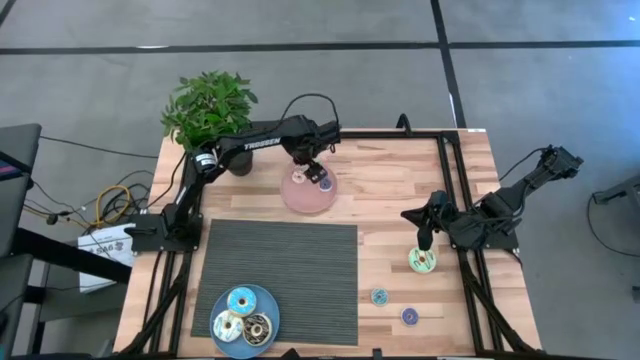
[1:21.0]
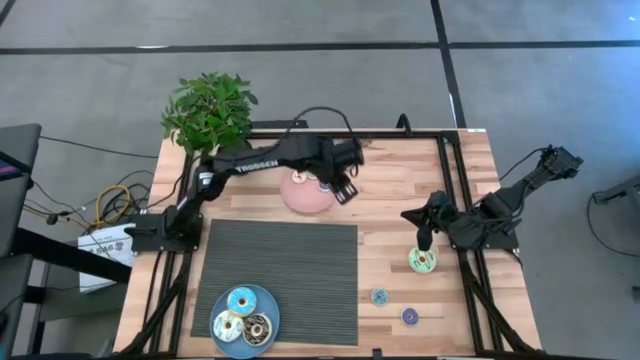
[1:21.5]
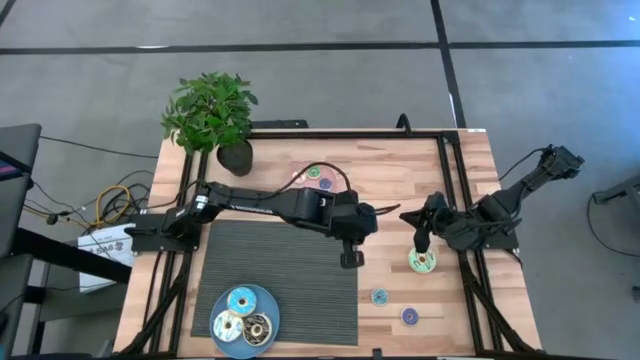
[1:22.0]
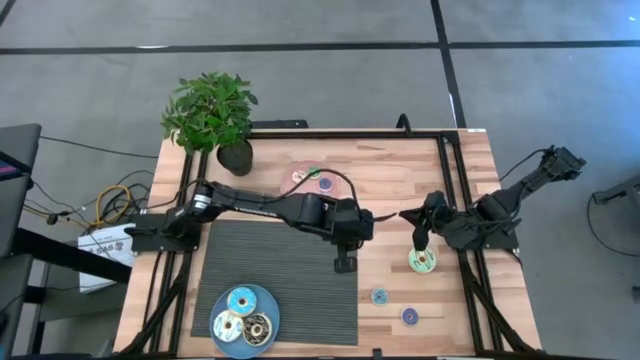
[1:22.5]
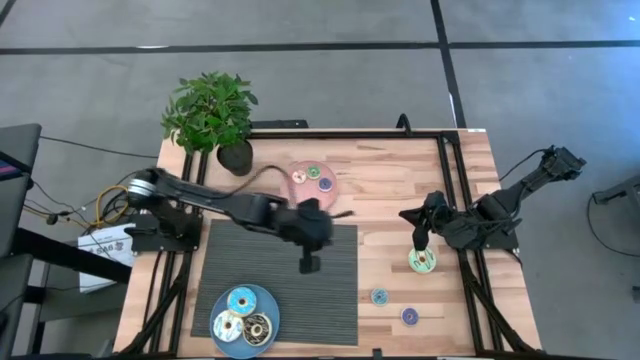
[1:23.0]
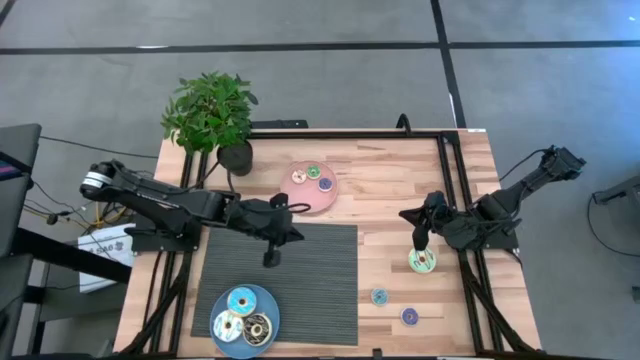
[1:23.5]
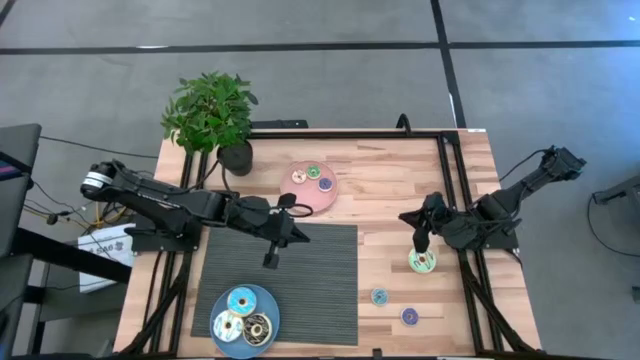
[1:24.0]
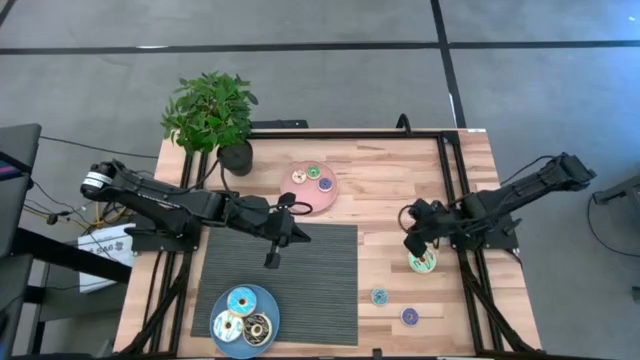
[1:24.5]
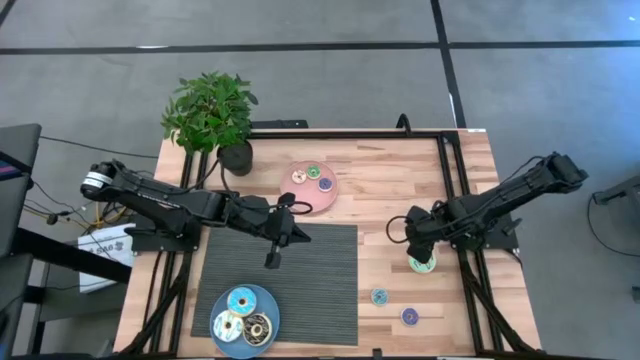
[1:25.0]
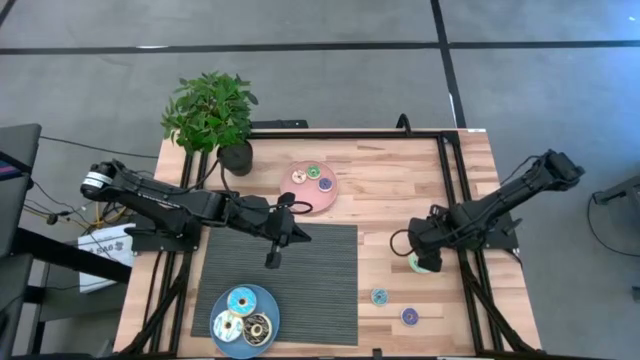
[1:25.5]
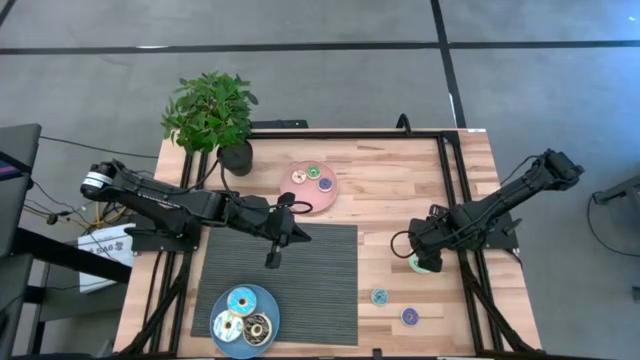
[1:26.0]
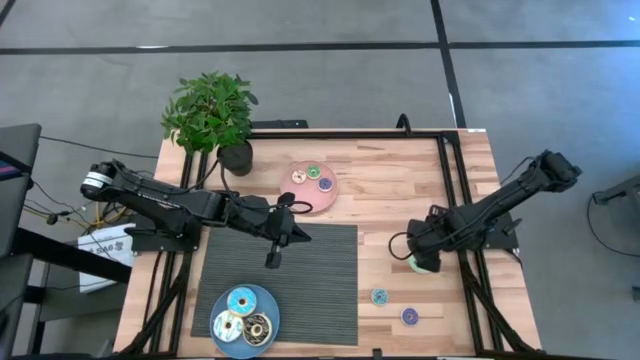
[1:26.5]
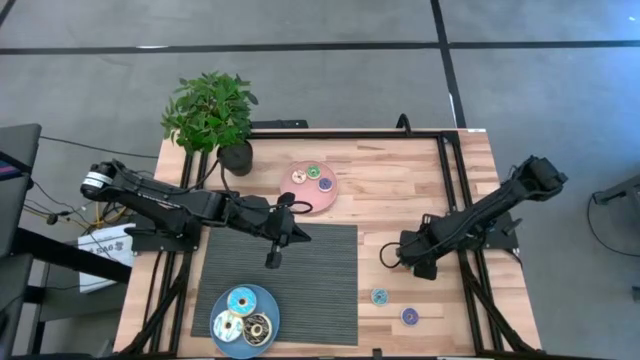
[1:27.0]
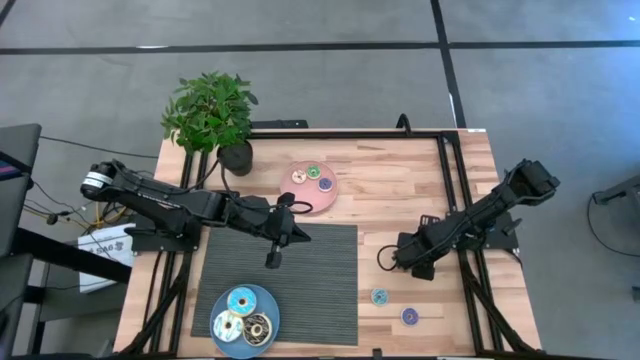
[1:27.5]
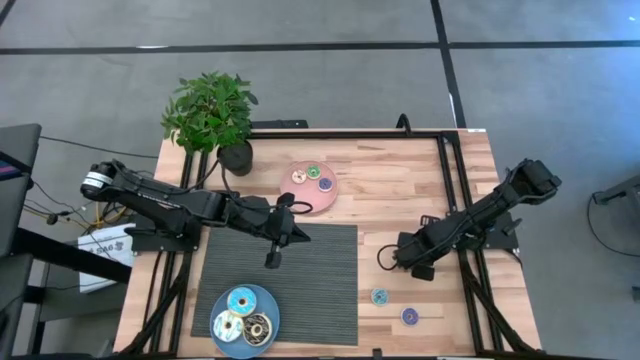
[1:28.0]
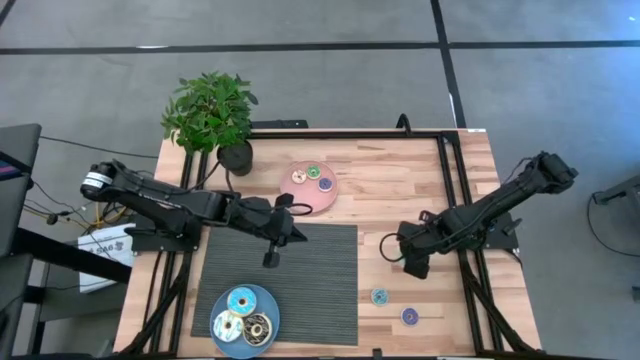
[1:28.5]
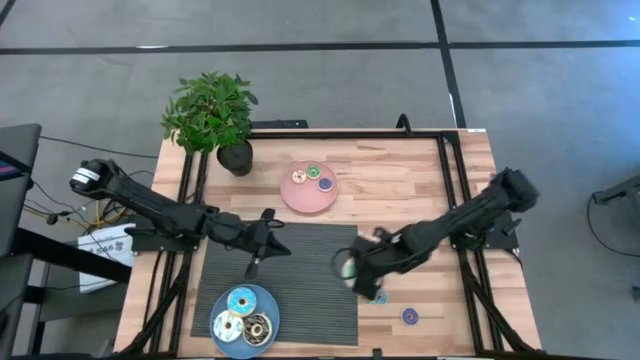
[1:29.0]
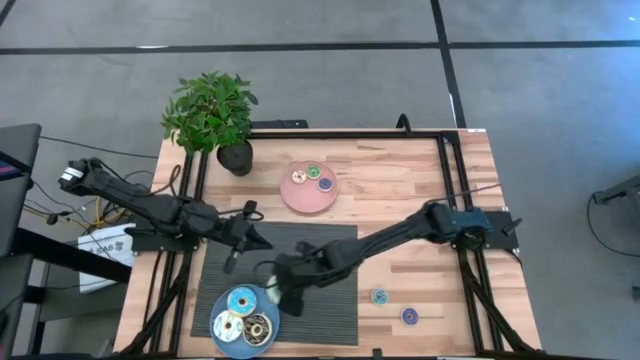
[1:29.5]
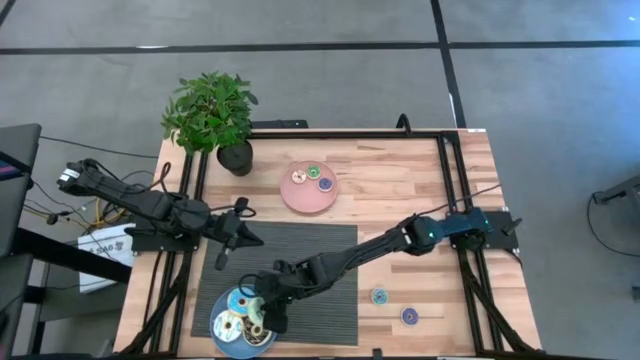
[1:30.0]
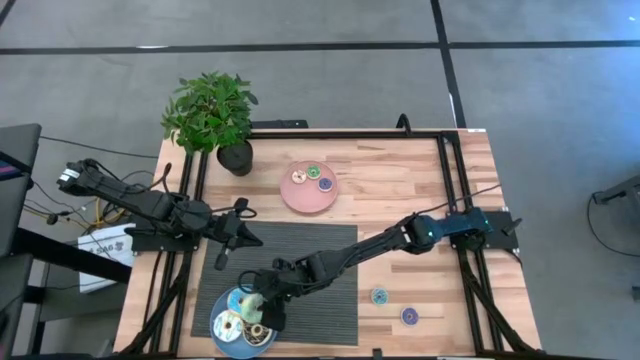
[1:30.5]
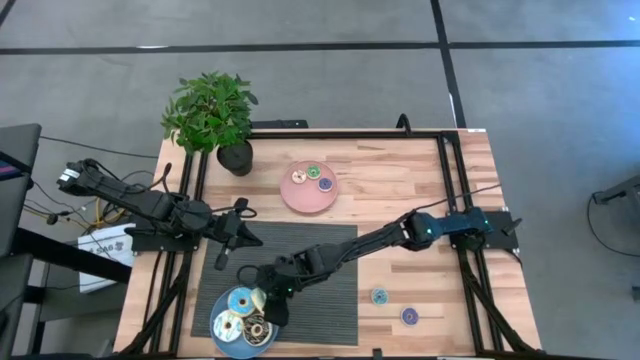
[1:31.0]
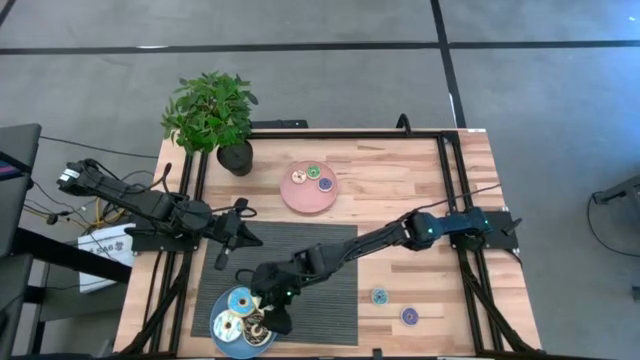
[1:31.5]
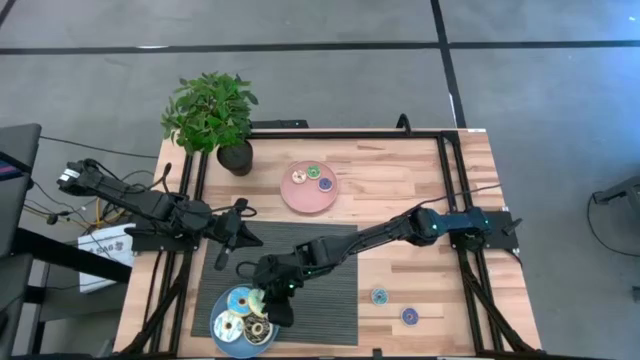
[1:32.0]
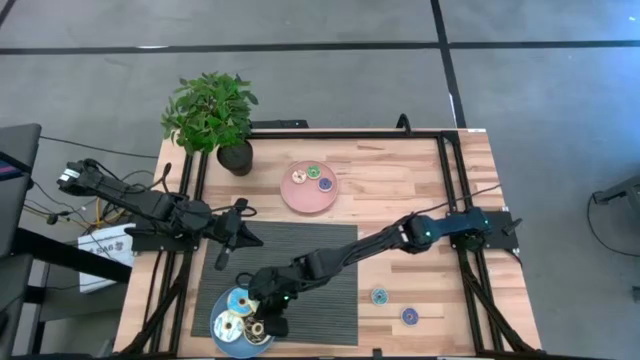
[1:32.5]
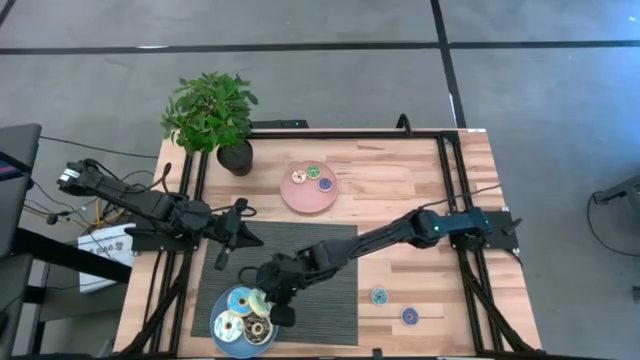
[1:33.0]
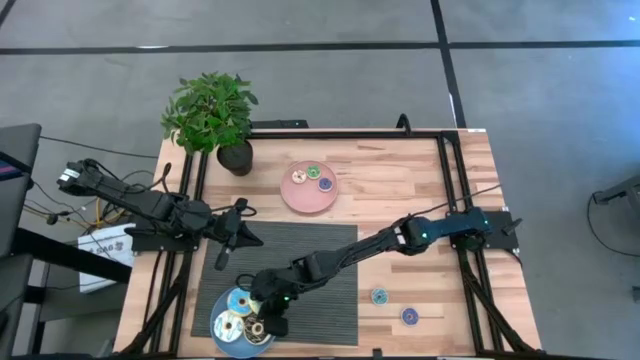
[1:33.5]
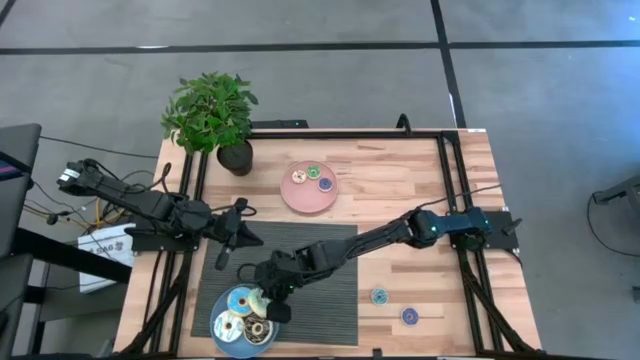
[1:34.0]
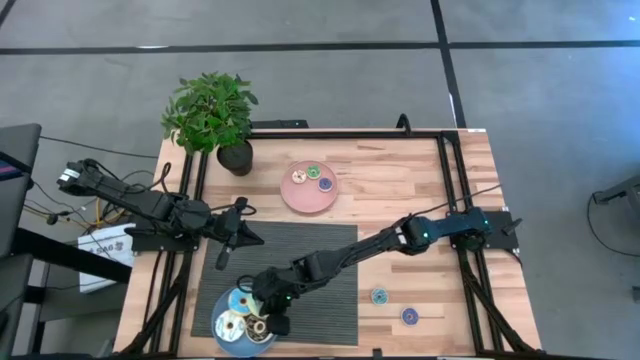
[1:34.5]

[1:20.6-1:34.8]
Task: Pick & Place donuts
Put the big light blue donut on the blue plate

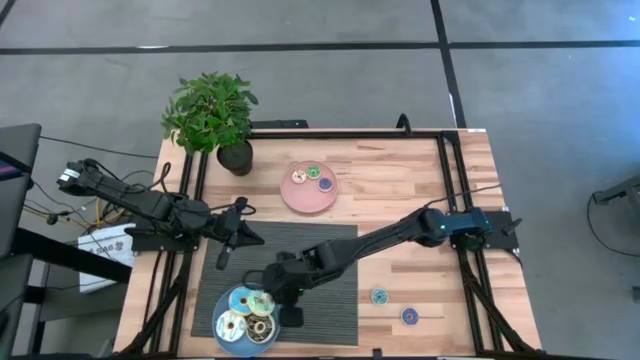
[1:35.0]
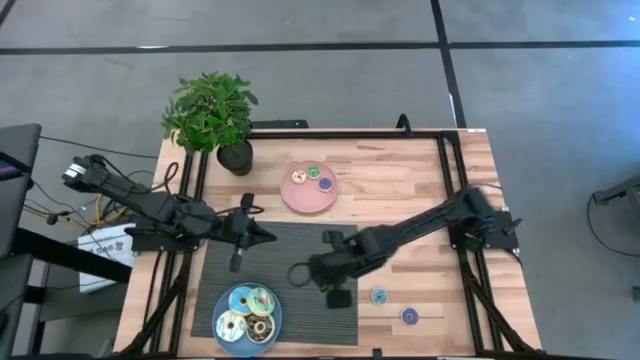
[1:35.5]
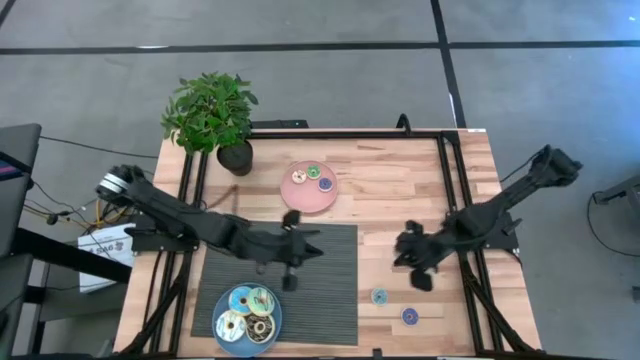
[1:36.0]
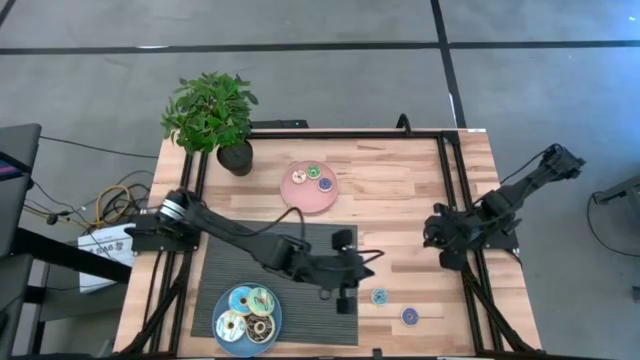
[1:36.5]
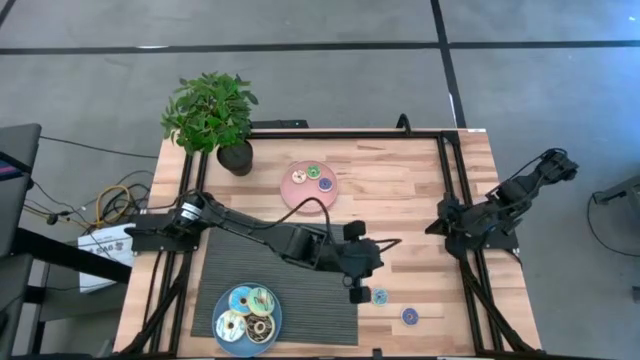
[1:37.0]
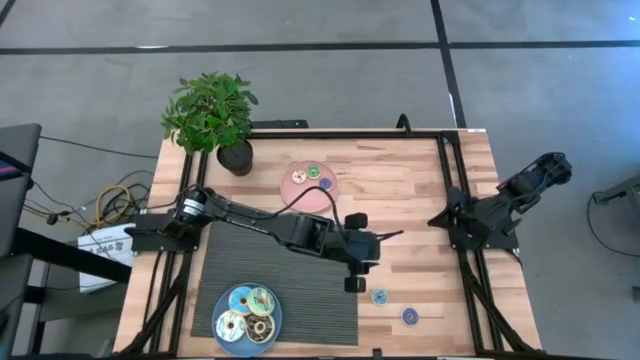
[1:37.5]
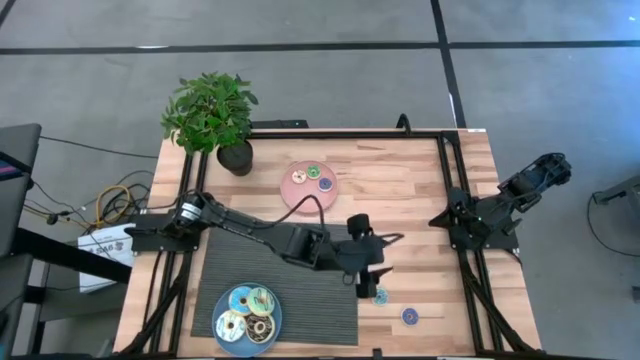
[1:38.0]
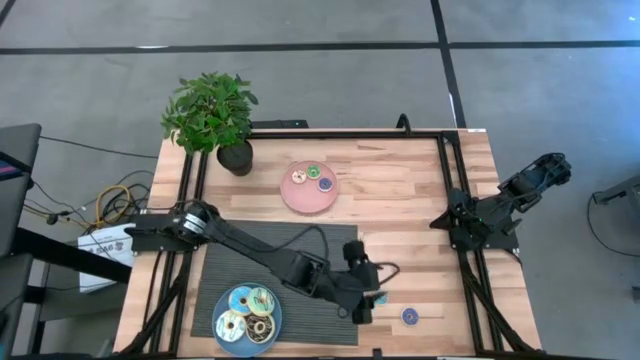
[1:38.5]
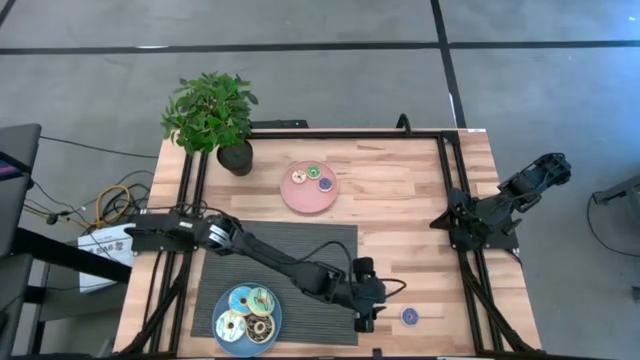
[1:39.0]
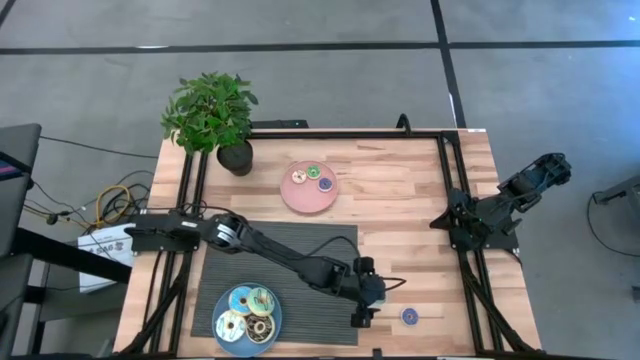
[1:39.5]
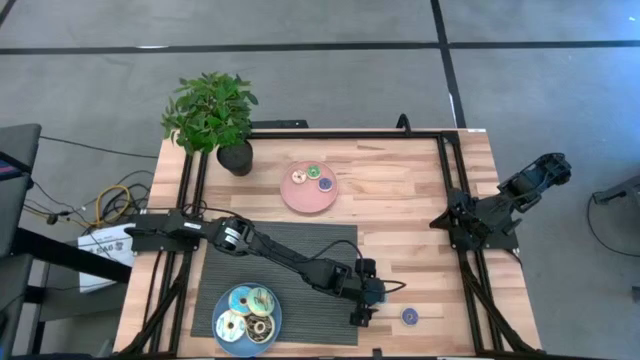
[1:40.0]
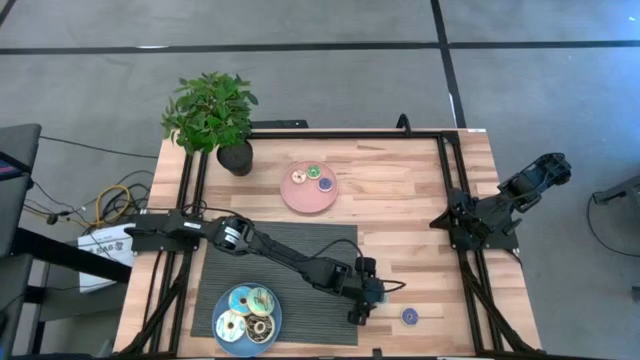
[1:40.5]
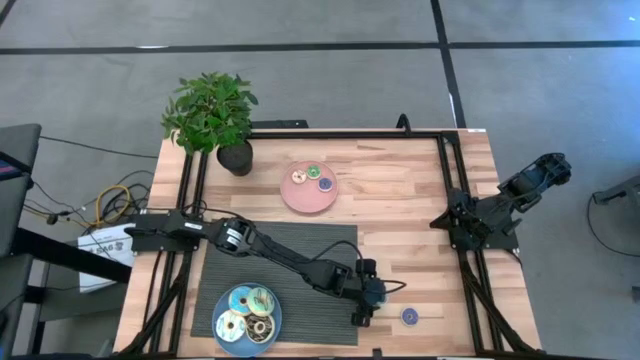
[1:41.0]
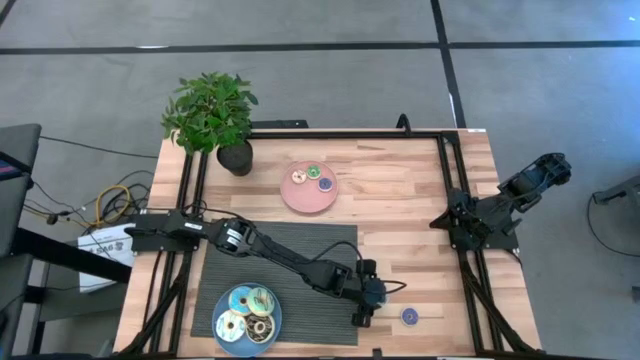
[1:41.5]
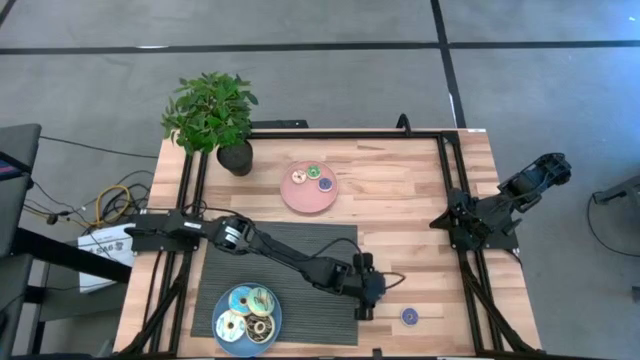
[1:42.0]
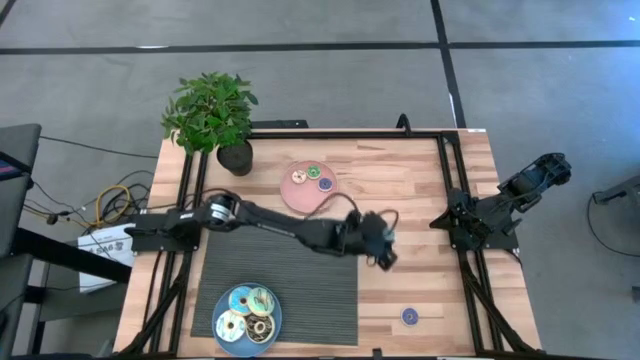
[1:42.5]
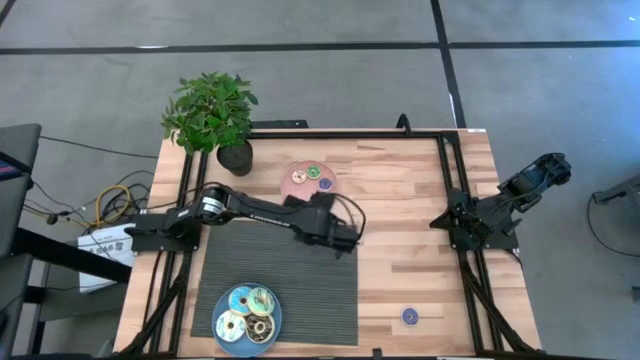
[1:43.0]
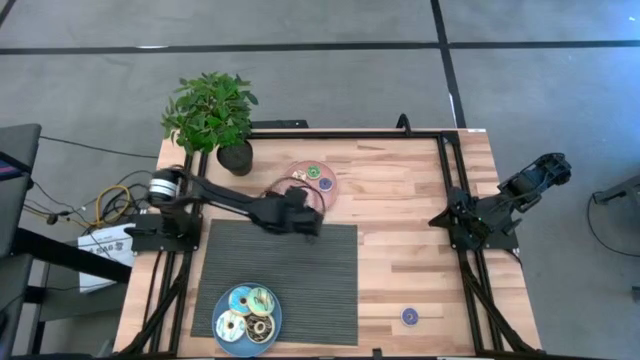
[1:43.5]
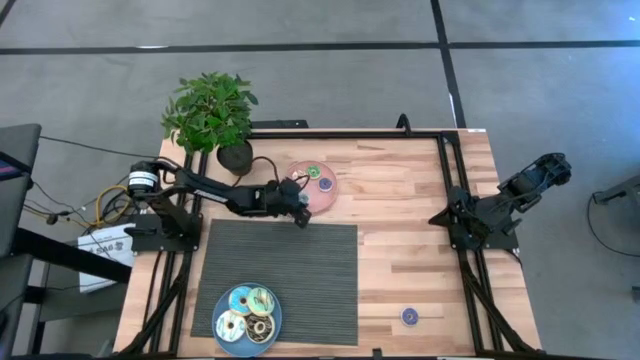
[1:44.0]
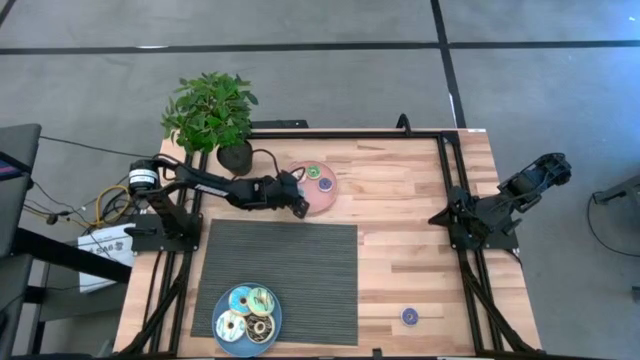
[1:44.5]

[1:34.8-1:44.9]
Put the small blue donut on the pink plate
